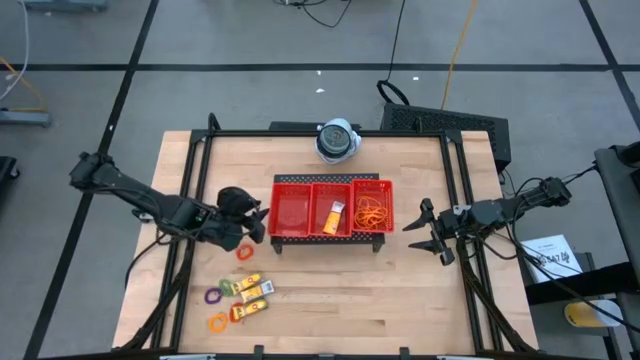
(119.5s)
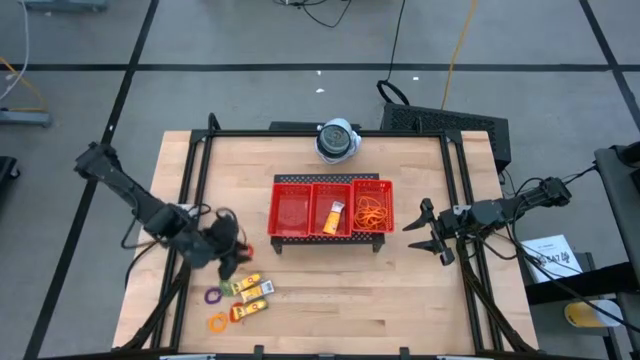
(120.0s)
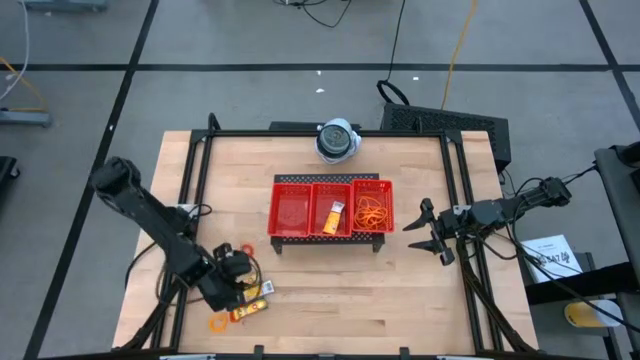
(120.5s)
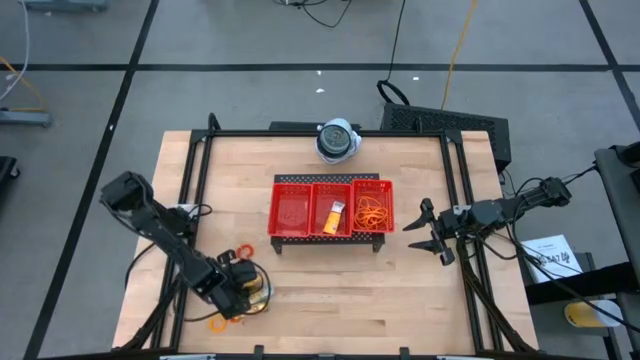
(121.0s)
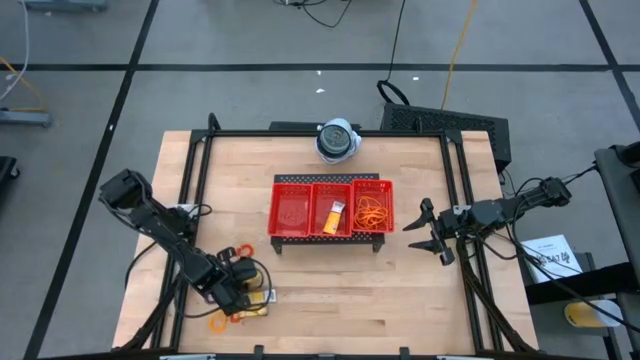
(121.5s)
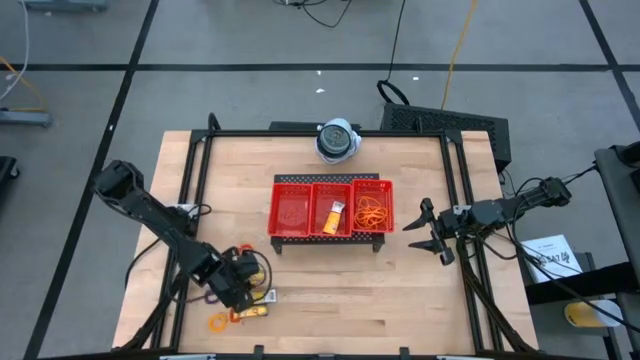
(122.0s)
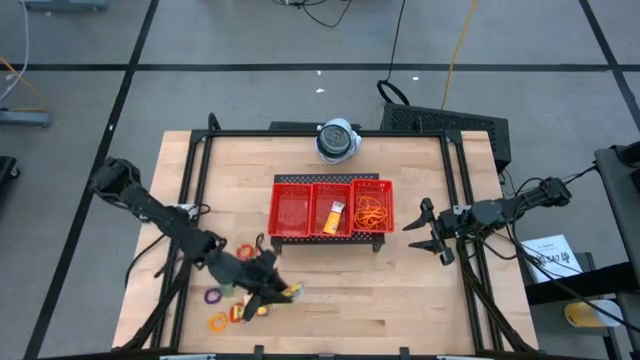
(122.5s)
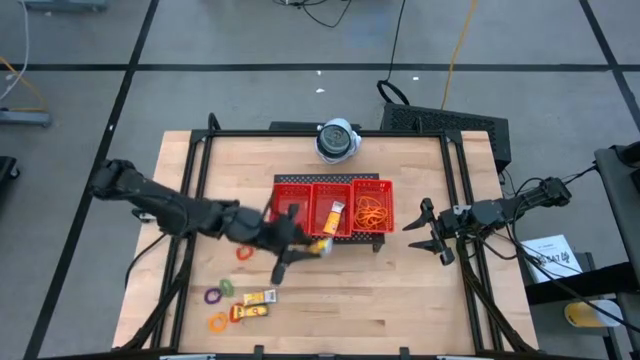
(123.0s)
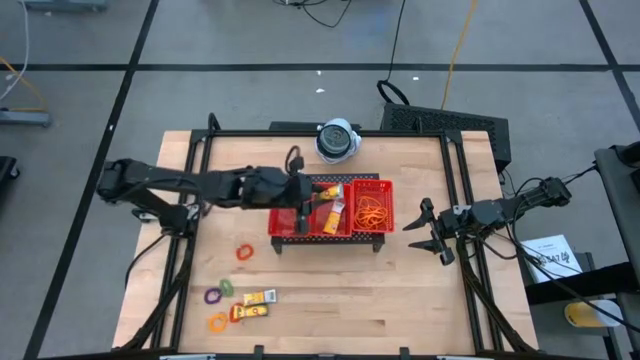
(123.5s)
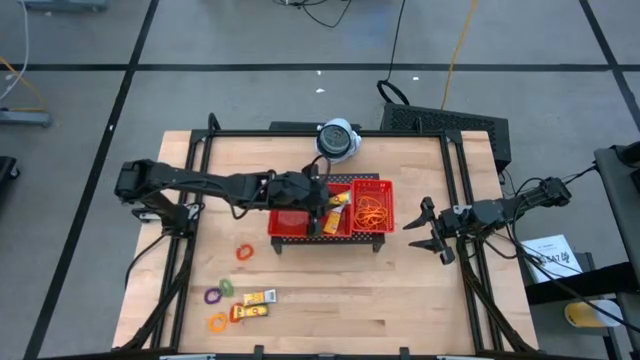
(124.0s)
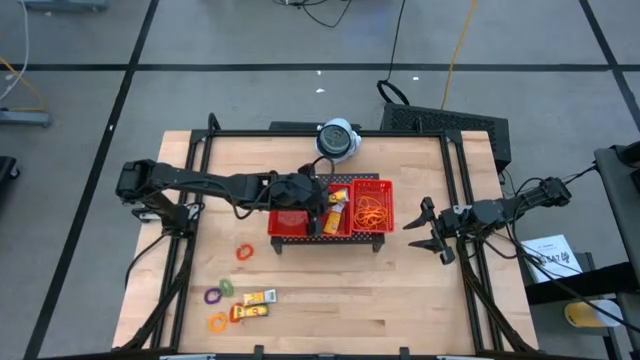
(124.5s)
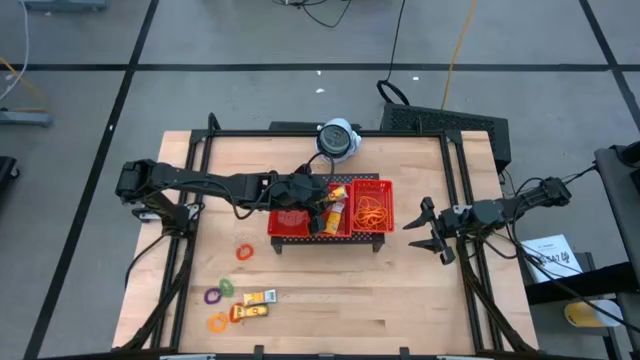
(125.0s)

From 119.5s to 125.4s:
Task: Pick & Place Office Desk Supplies
Put the yellow crayon box into the middle red bin

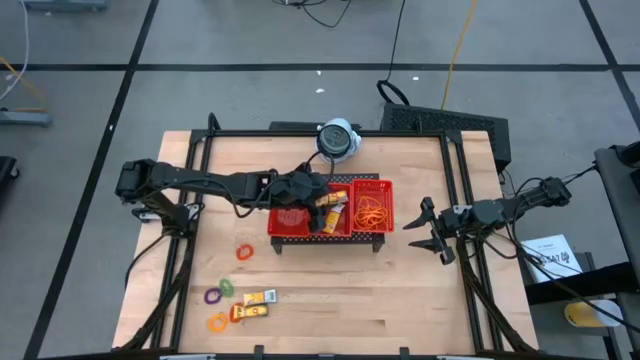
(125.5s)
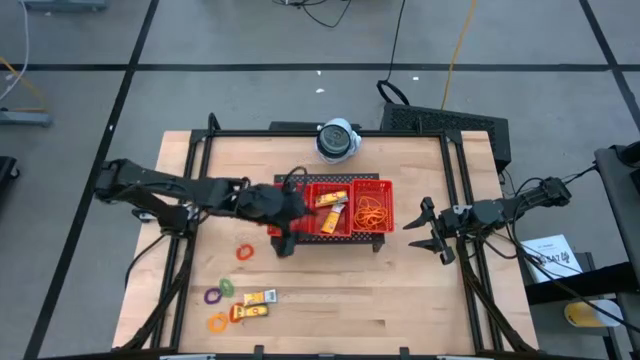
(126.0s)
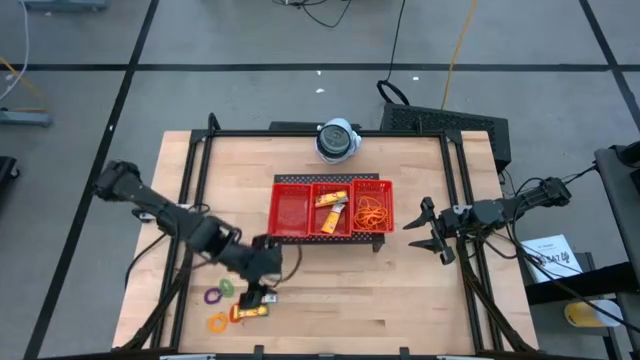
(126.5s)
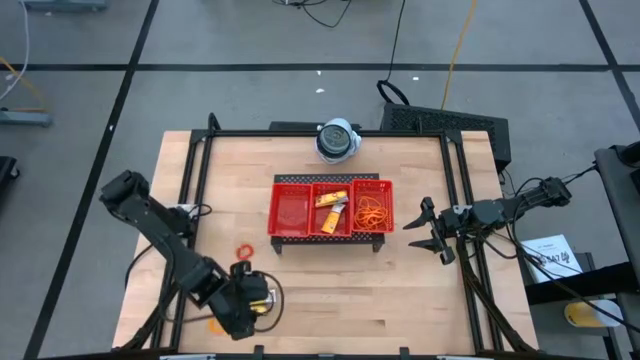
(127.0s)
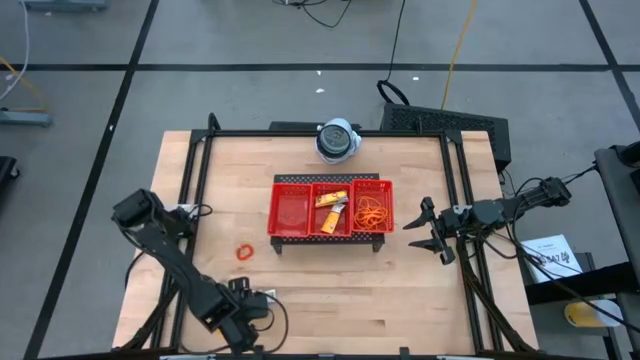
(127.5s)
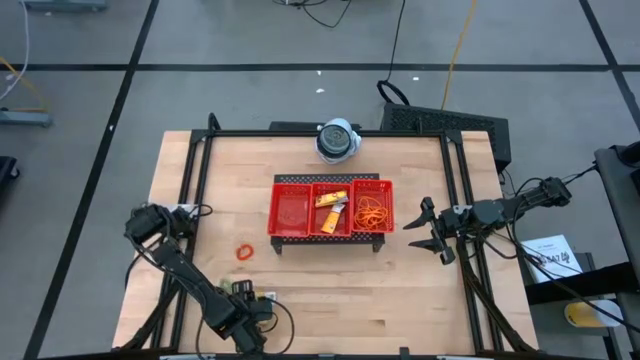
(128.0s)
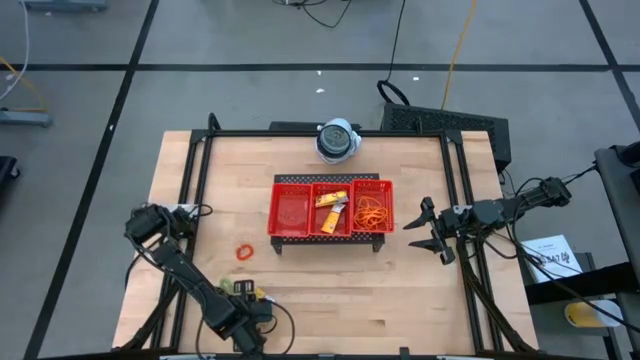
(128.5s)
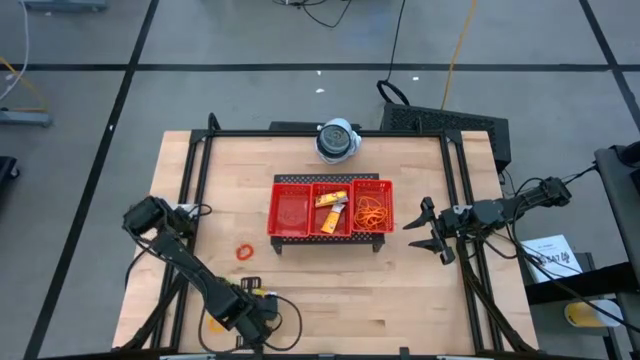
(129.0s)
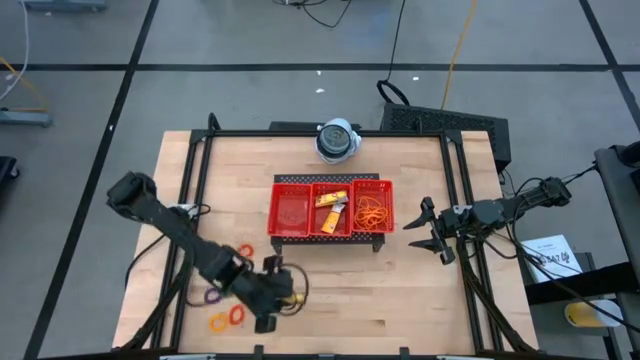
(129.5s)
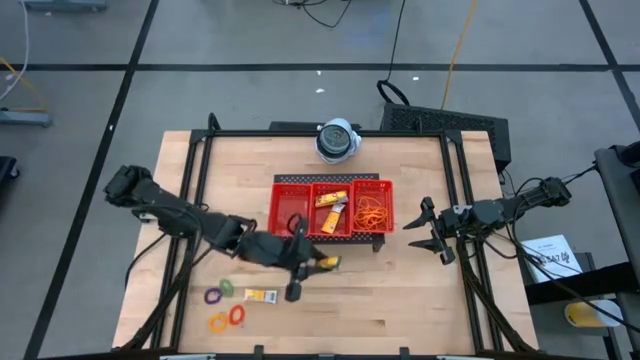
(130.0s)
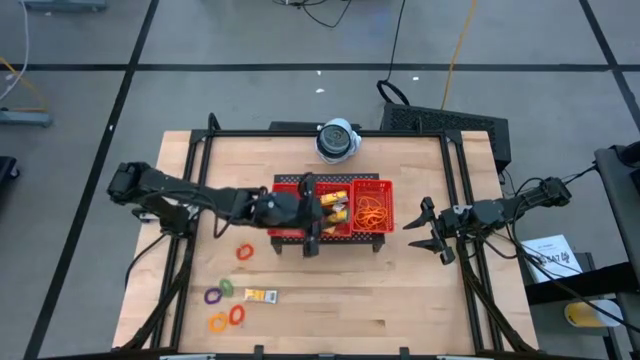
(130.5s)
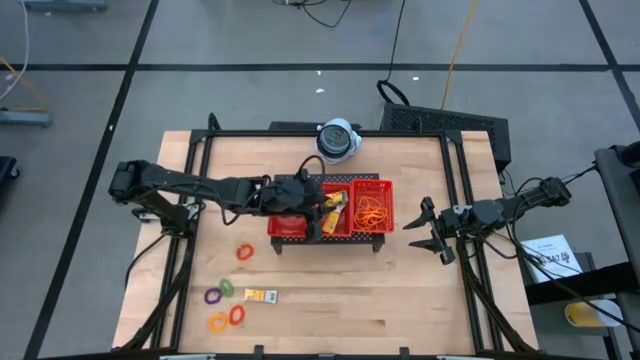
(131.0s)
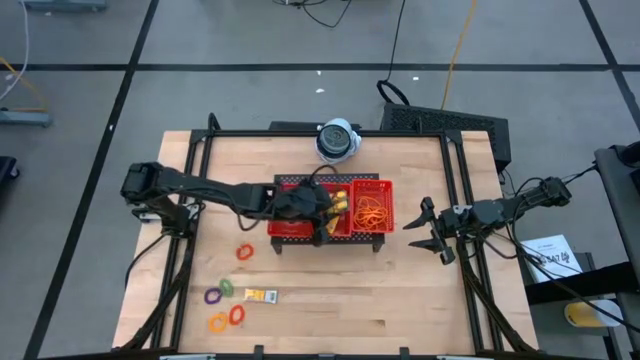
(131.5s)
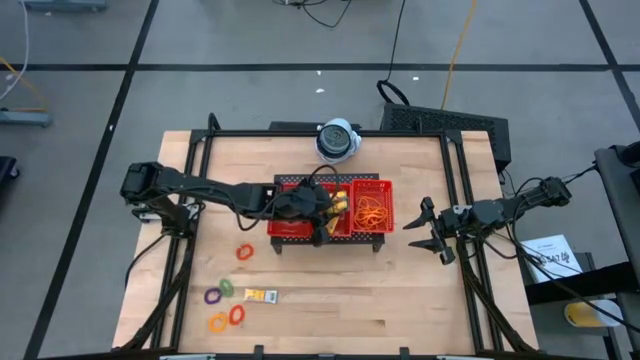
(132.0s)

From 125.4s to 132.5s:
Put the yellow crayon box into the middle red bin

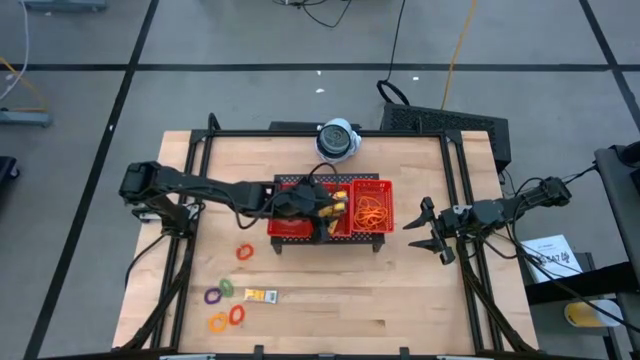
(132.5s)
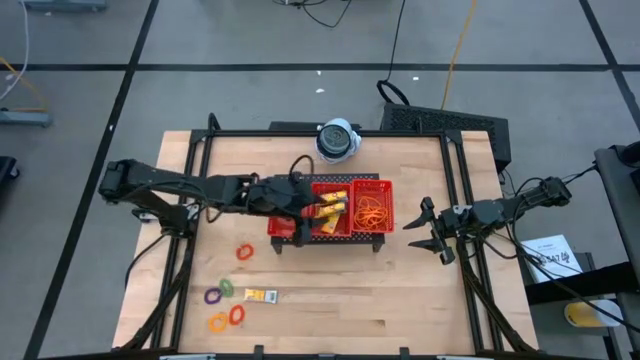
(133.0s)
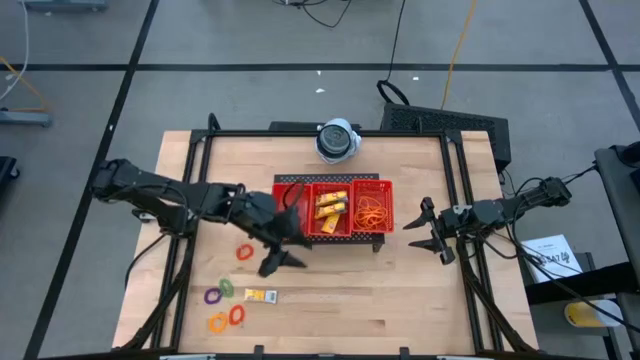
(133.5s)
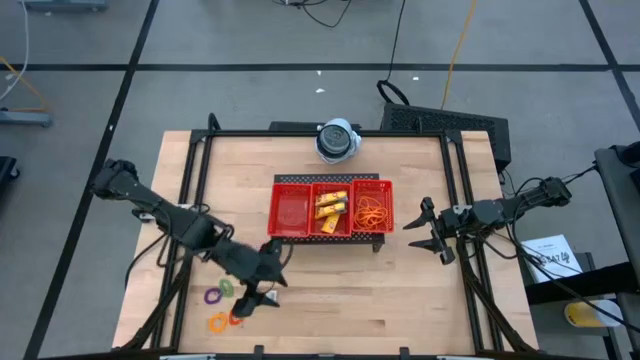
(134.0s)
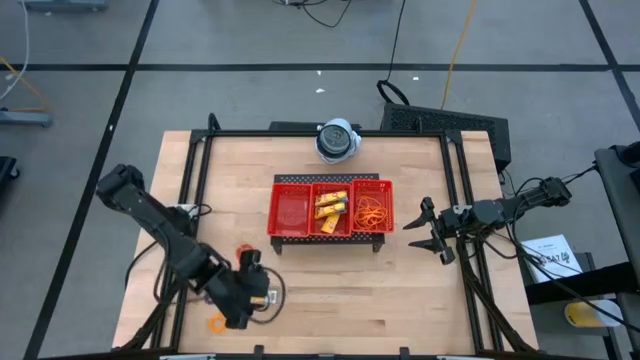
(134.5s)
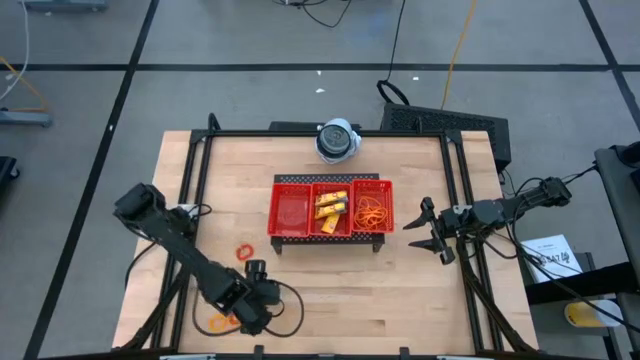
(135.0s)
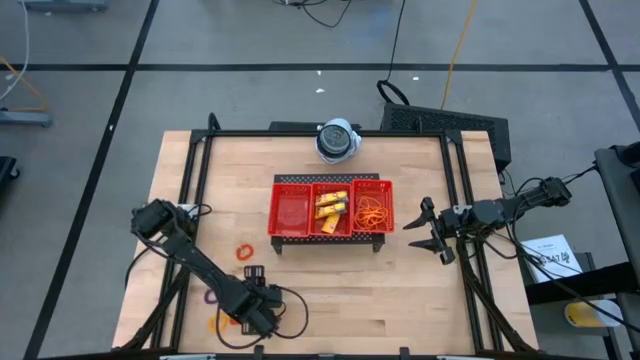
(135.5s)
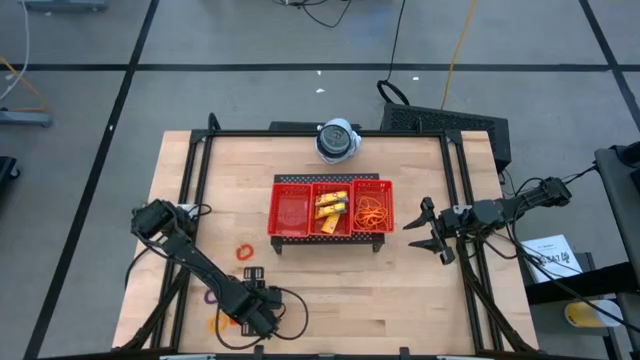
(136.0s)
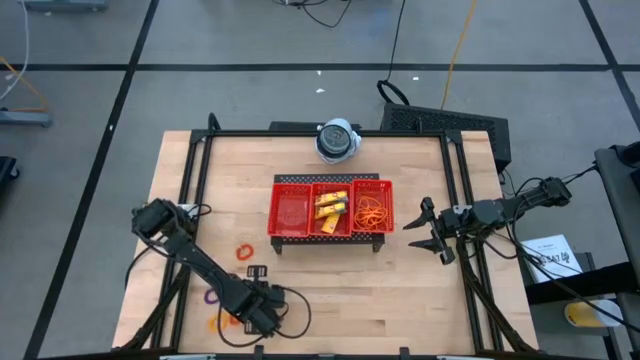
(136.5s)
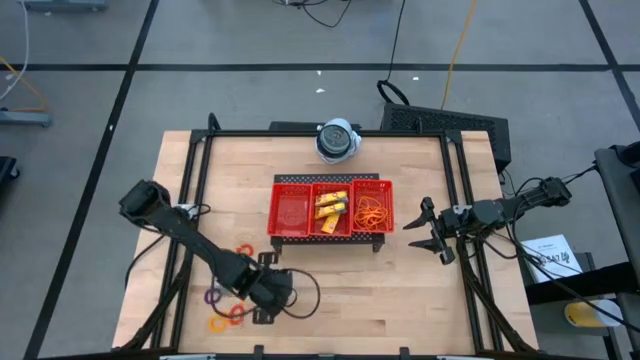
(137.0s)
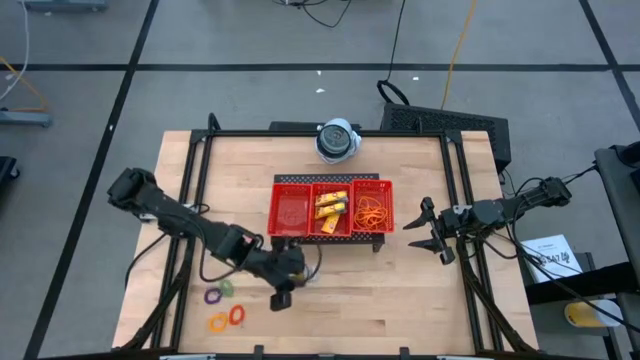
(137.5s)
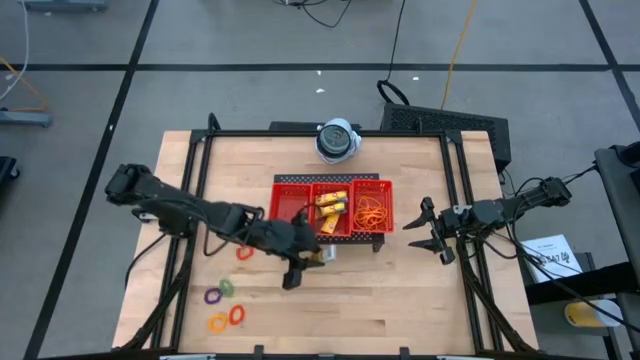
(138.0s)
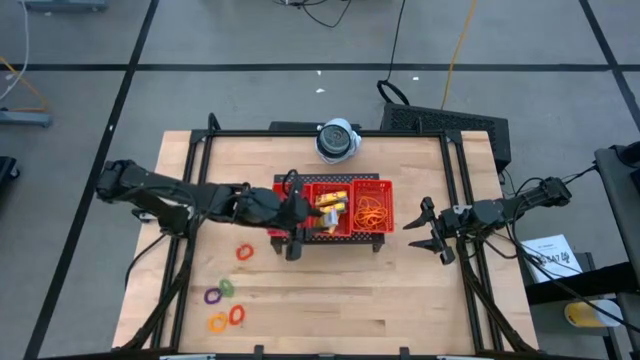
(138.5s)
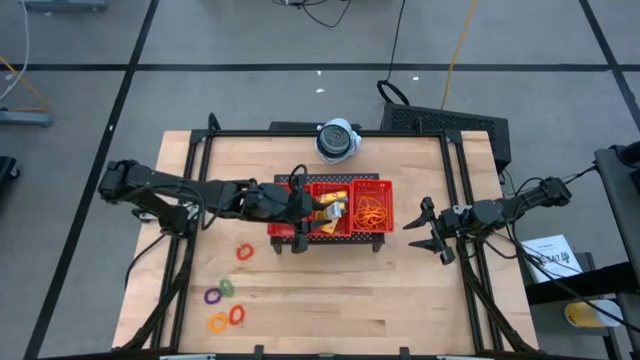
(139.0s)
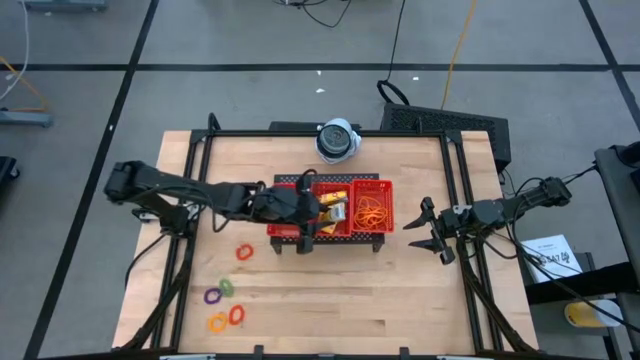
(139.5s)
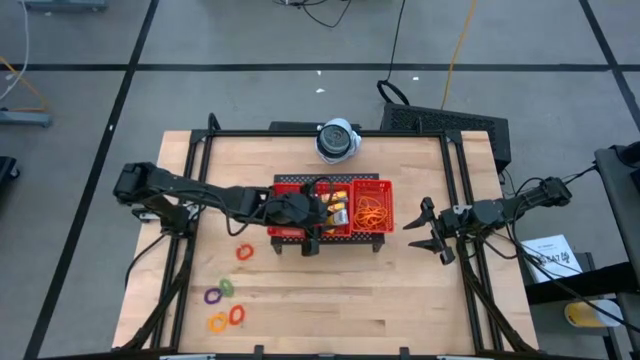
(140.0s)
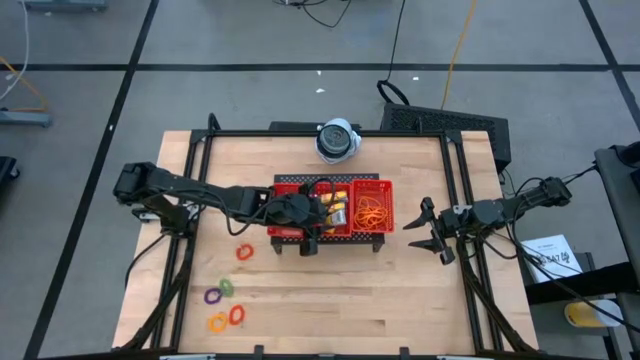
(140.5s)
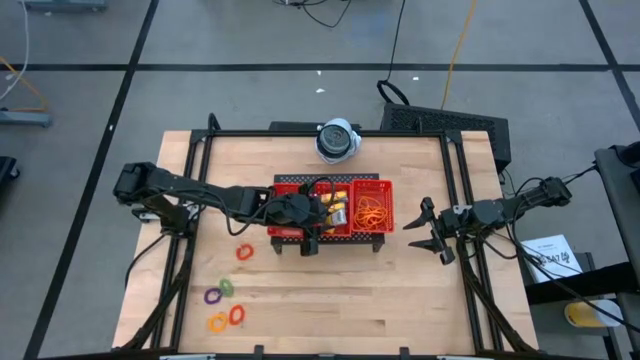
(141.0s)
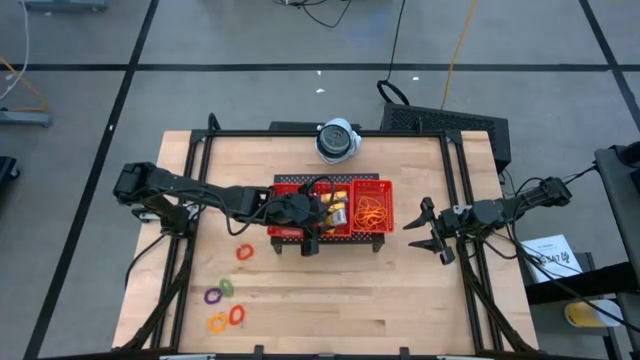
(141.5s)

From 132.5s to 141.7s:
Put the yellow crayon box into the middle red bin
